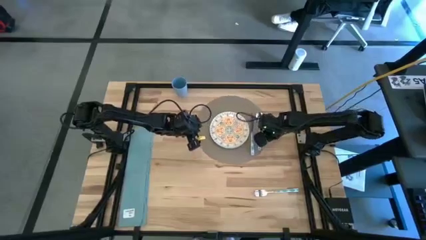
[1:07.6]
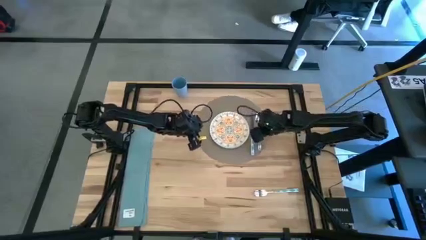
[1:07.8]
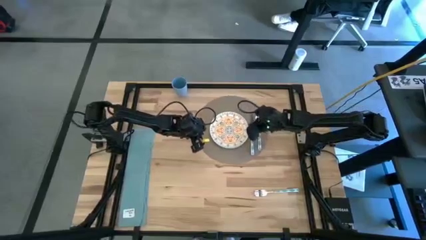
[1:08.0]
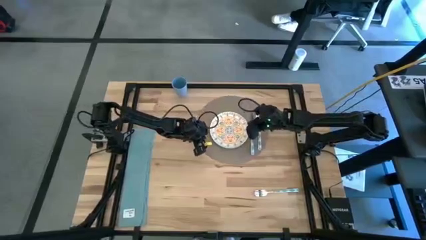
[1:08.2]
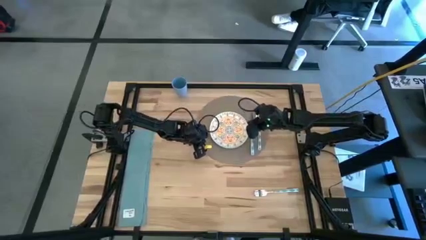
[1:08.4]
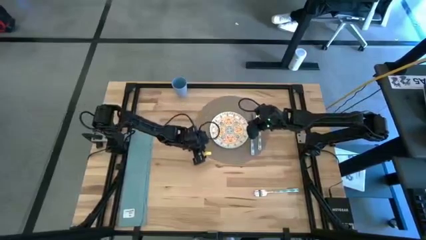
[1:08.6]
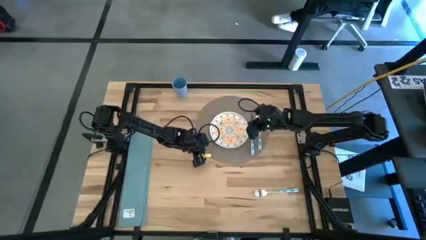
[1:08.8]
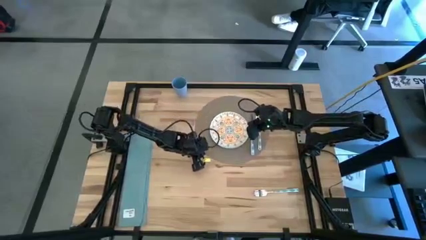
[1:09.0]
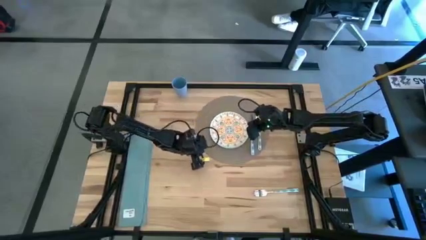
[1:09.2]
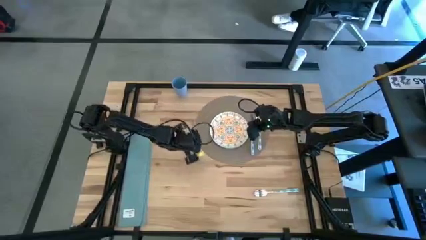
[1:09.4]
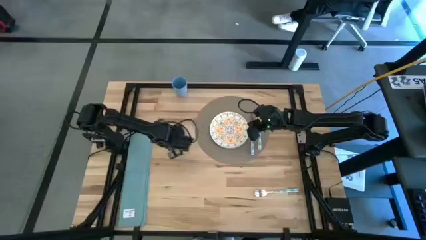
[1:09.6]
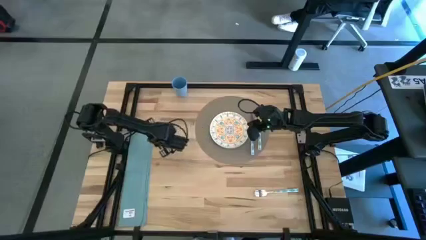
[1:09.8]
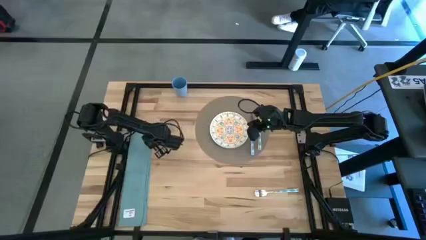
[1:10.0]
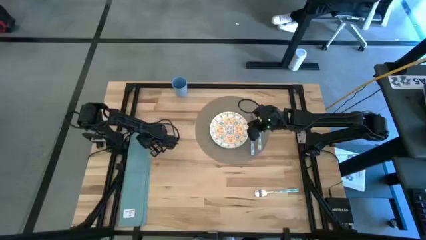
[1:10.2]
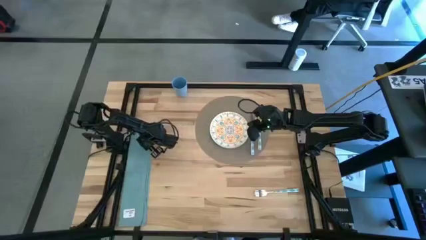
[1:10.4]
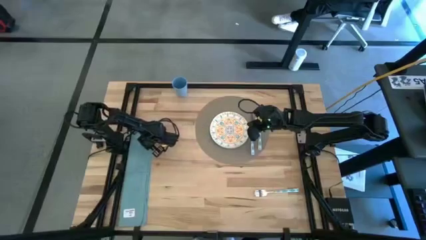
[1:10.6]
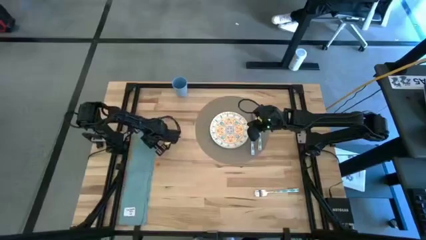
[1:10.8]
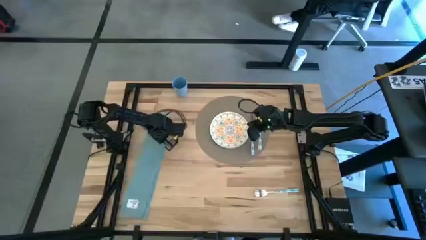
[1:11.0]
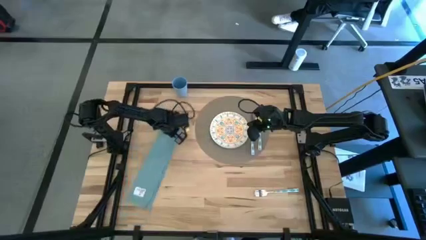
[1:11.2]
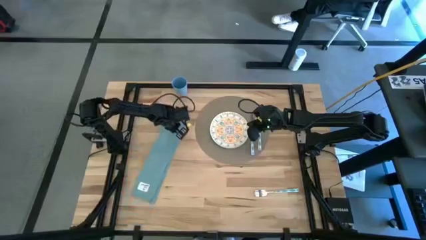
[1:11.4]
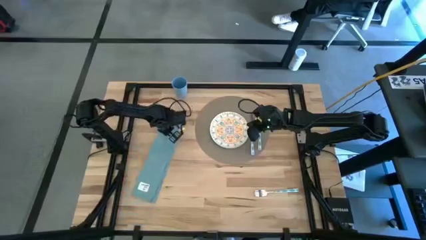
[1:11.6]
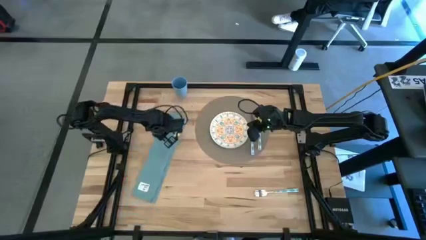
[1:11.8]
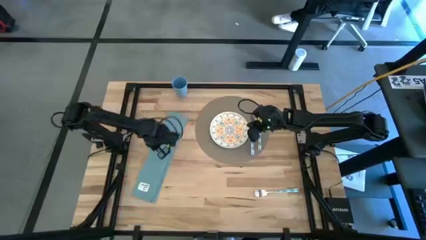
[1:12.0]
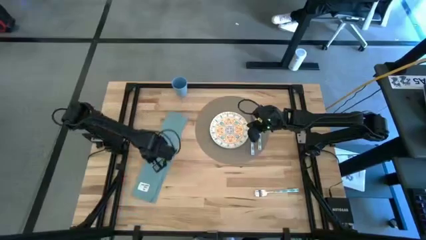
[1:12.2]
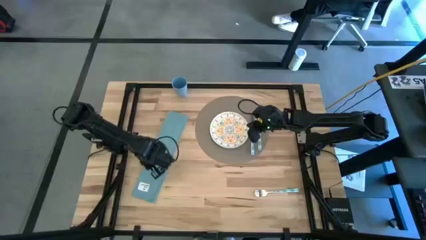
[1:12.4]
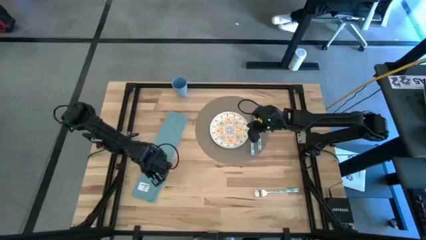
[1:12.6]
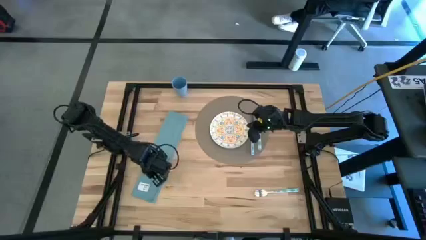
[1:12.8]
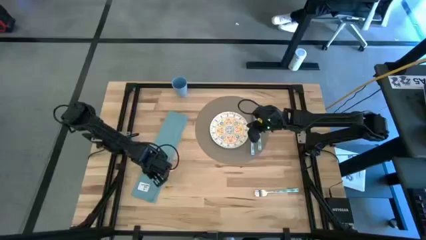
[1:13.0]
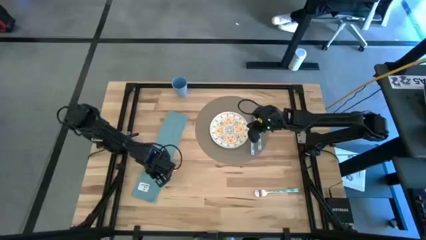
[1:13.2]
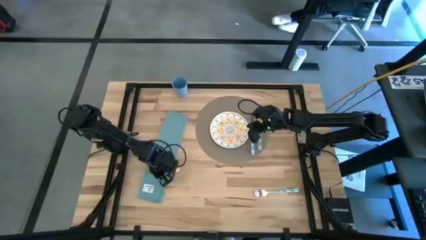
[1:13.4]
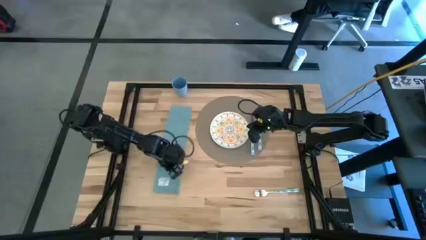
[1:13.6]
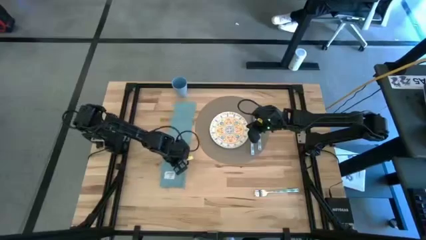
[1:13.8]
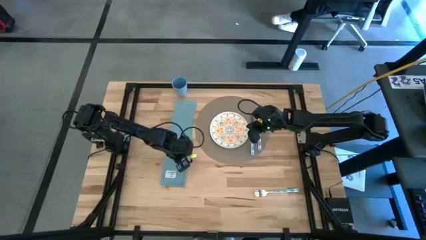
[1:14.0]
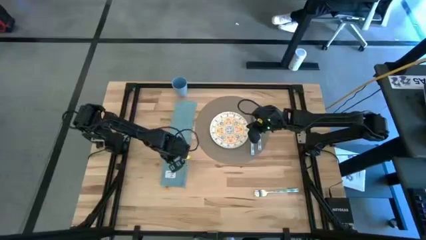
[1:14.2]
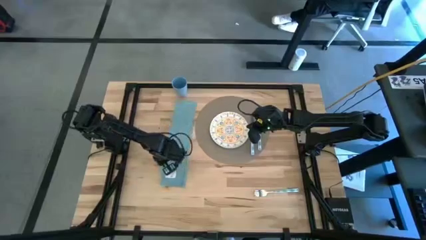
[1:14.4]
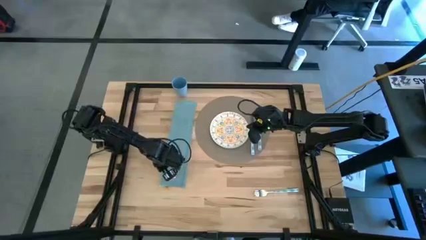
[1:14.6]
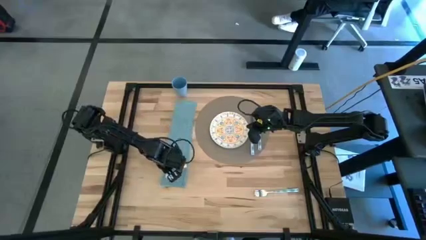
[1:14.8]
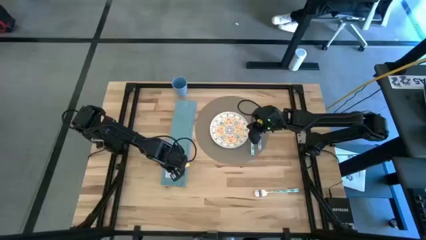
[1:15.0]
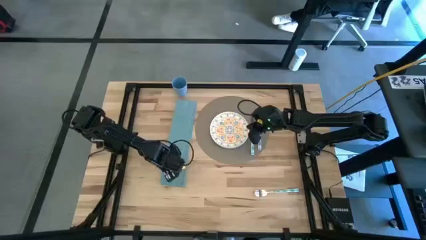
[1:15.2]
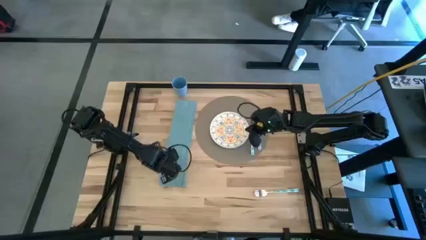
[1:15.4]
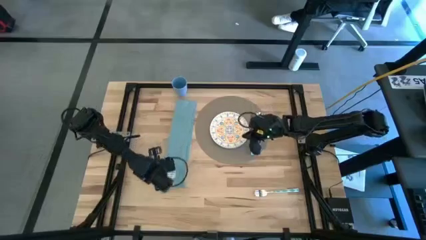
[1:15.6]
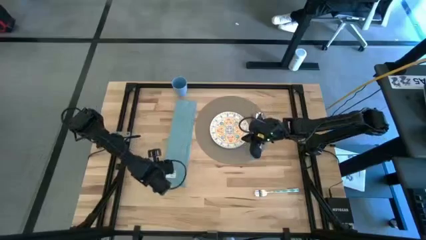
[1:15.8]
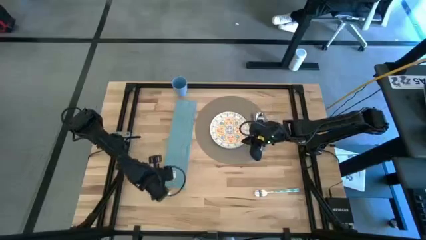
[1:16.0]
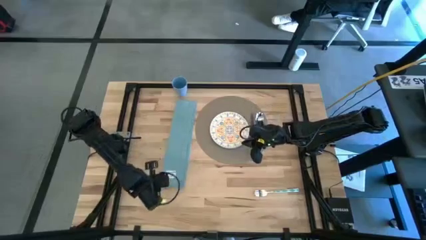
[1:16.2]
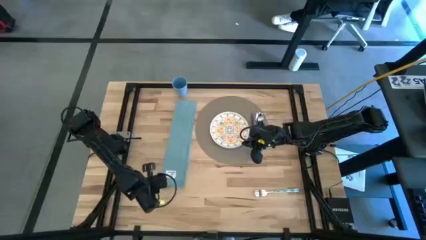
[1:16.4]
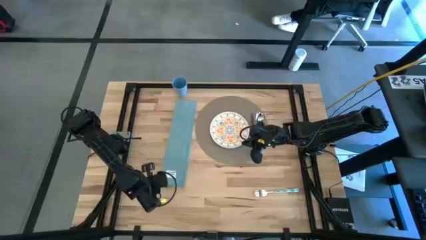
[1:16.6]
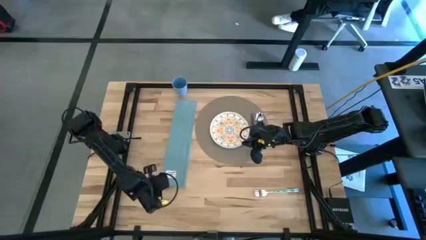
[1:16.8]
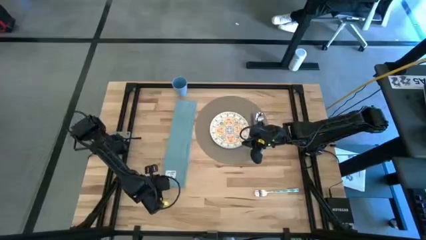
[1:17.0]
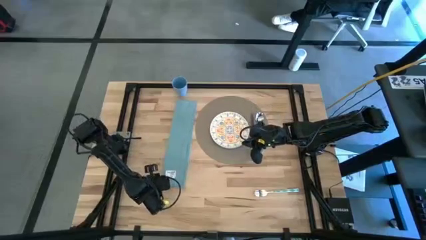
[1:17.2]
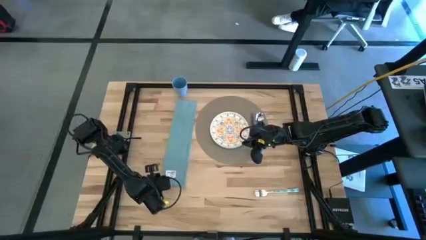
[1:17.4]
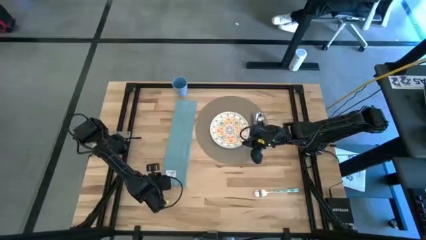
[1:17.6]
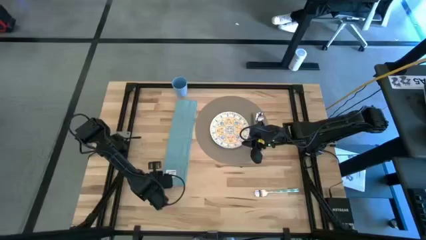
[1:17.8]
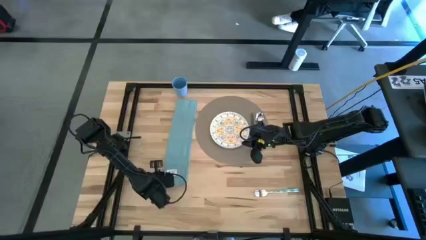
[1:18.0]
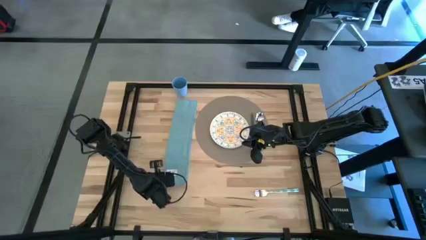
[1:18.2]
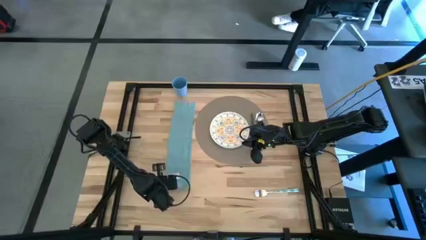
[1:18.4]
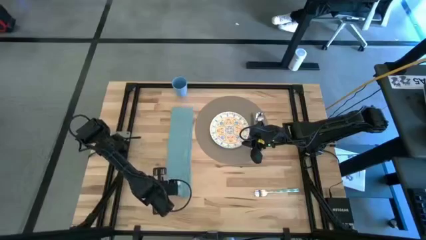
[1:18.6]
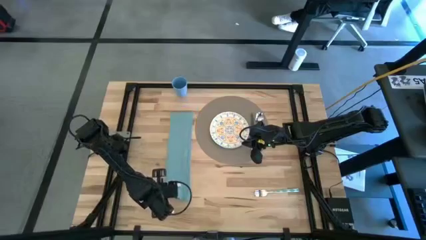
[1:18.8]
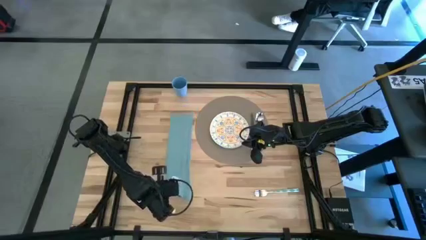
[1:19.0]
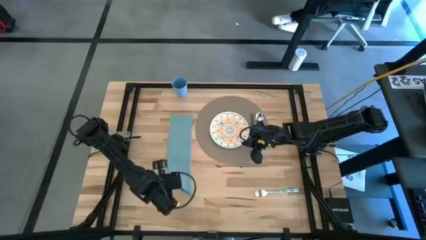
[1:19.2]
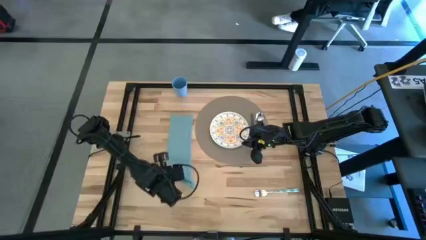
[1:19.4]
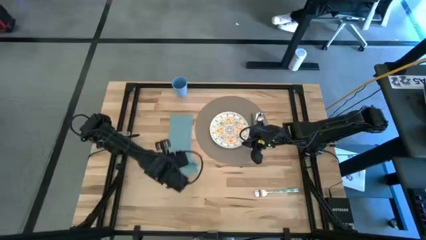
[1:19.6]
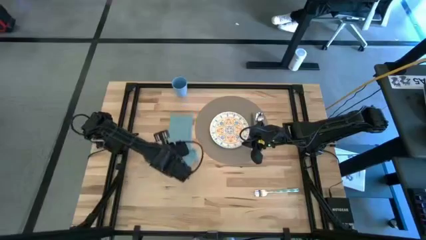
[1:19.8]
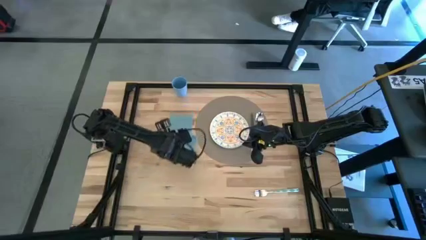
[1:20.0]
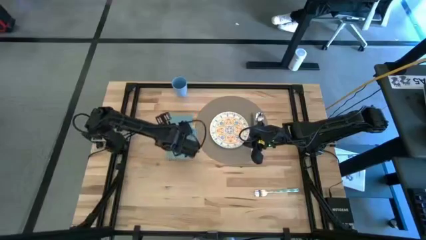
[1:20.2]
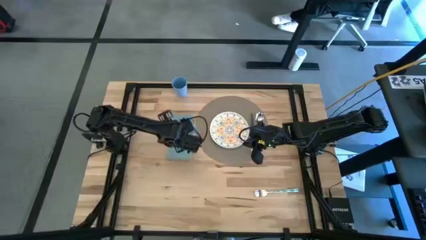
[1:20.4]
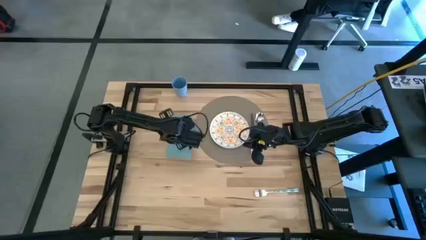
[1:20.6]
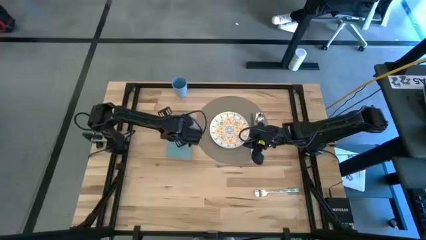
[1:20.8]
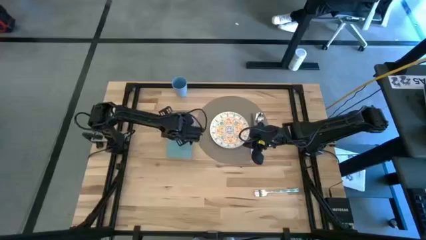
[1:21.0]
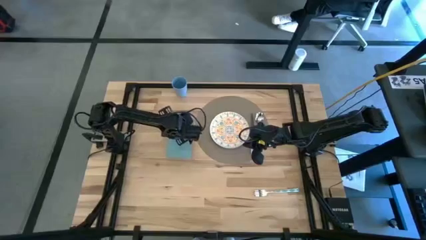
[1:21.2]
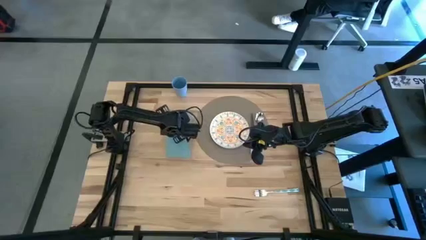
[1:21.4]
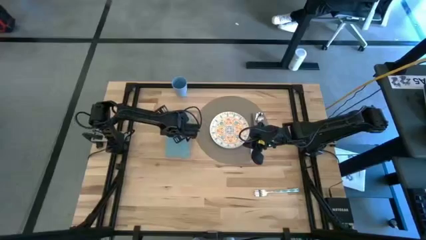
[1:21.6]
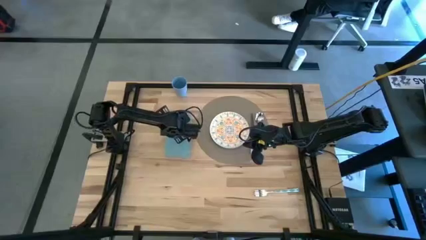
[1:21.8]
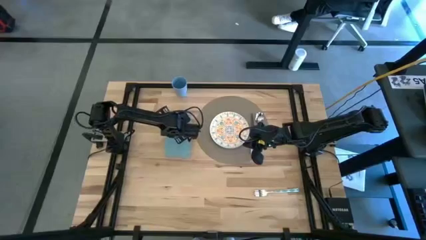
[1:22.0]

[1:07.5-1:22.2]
Task: Set table place
Fold the blue napkin
